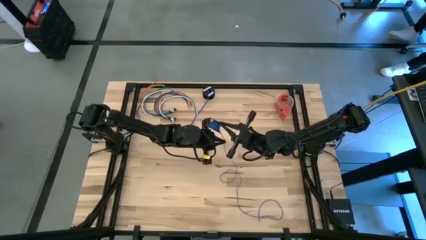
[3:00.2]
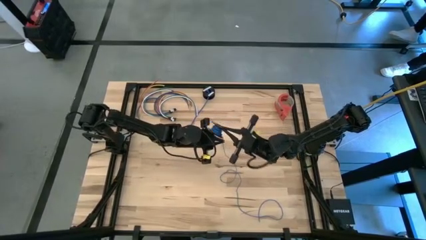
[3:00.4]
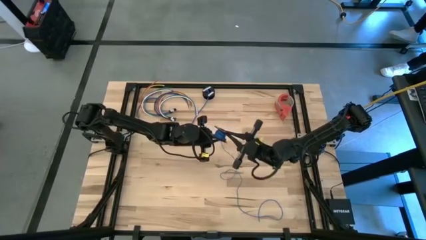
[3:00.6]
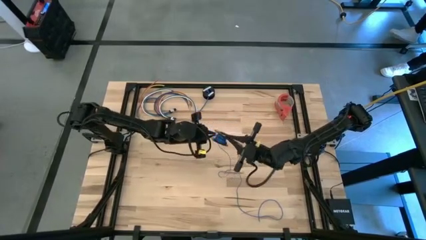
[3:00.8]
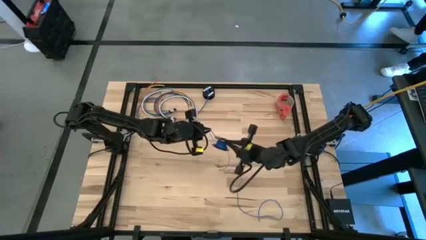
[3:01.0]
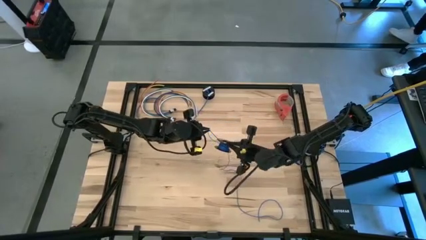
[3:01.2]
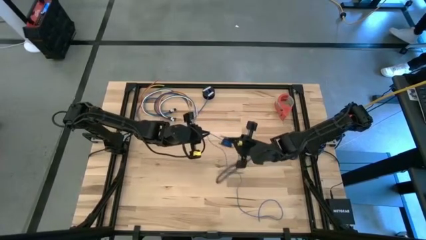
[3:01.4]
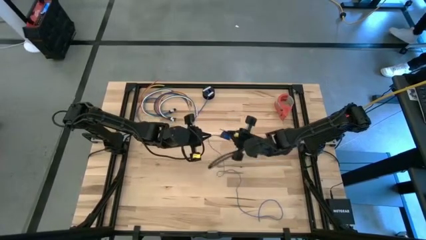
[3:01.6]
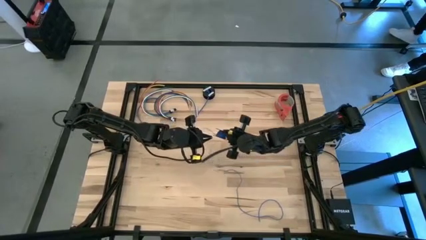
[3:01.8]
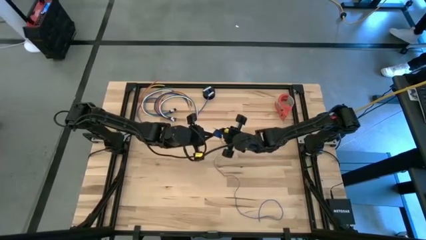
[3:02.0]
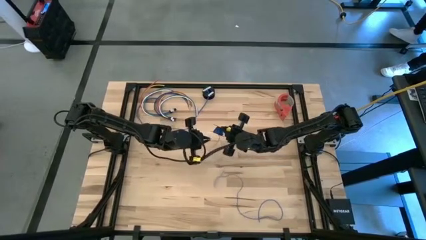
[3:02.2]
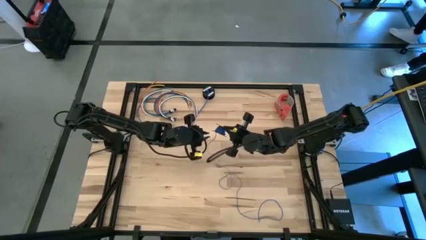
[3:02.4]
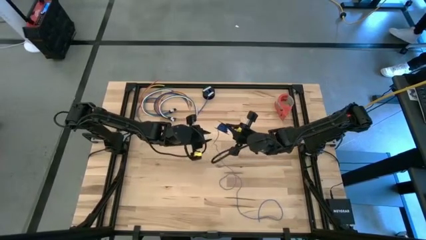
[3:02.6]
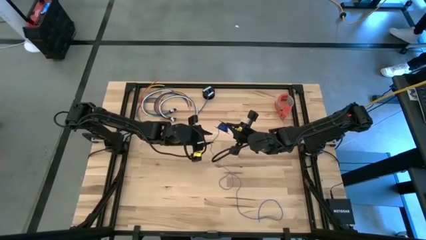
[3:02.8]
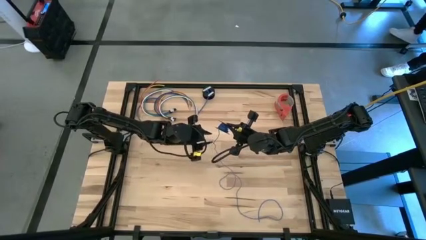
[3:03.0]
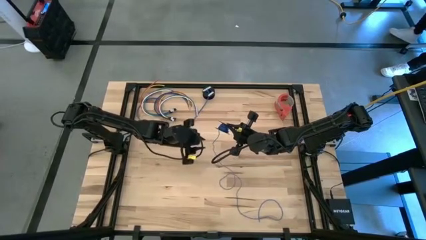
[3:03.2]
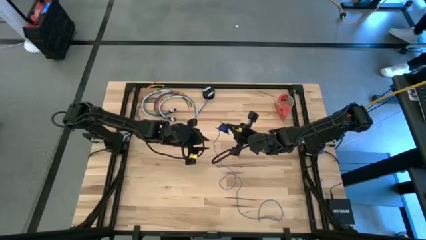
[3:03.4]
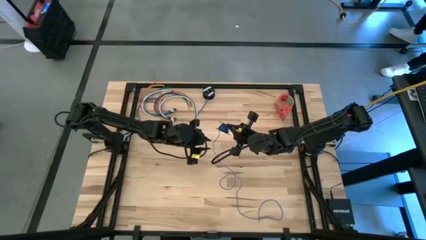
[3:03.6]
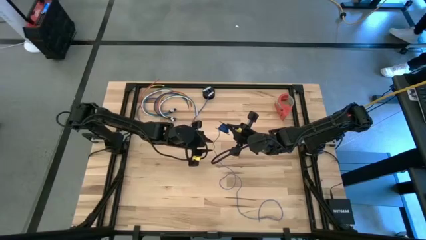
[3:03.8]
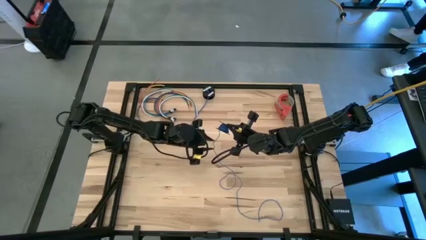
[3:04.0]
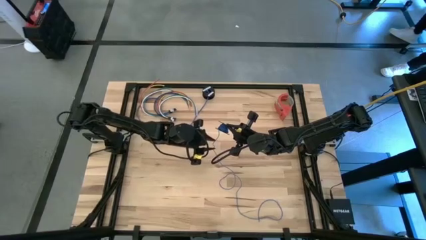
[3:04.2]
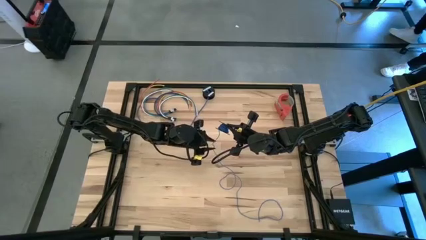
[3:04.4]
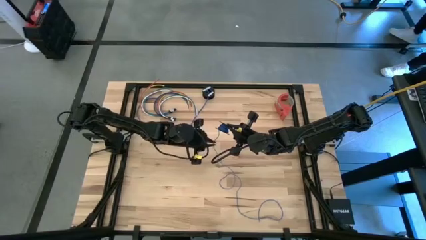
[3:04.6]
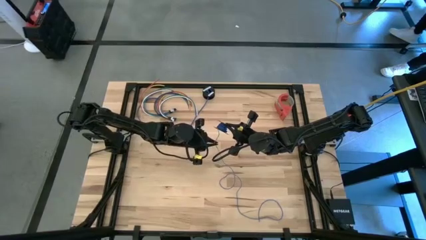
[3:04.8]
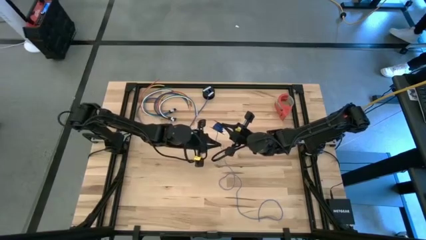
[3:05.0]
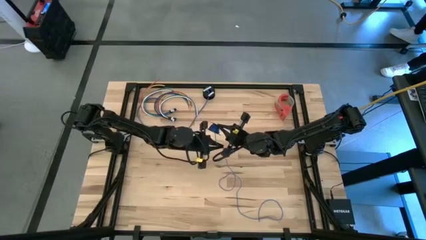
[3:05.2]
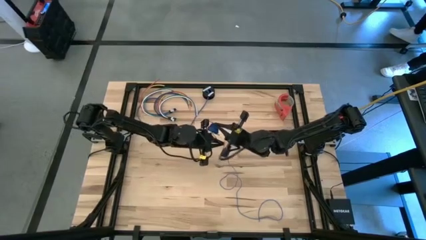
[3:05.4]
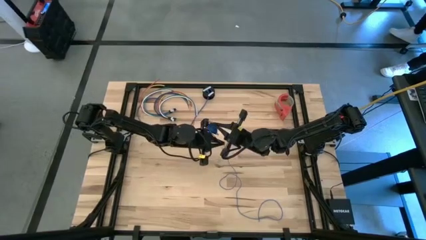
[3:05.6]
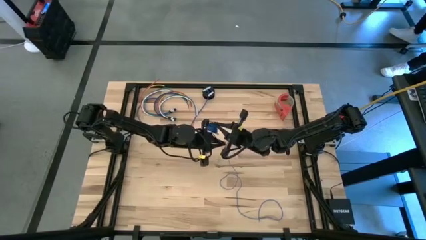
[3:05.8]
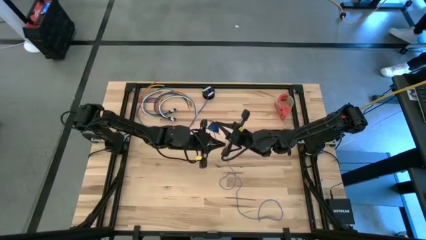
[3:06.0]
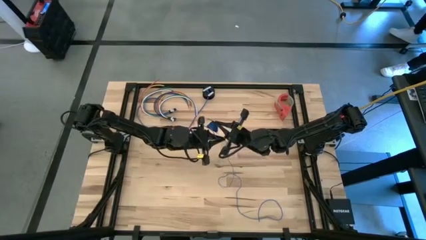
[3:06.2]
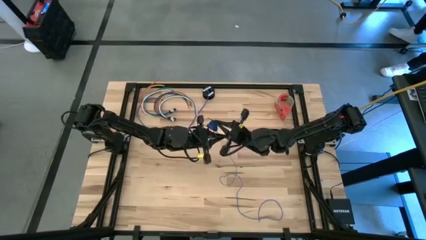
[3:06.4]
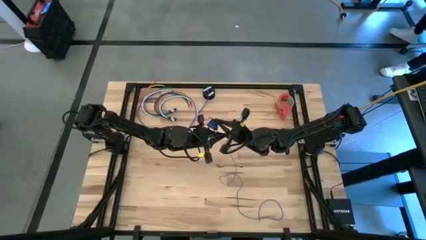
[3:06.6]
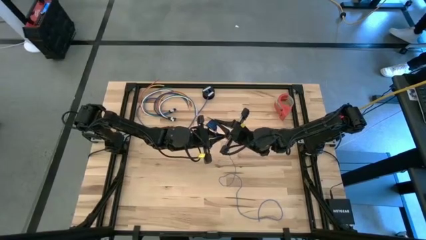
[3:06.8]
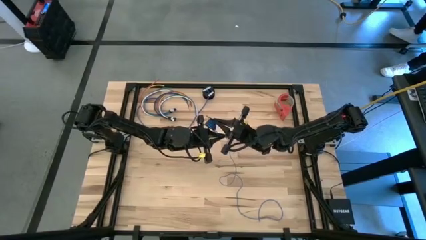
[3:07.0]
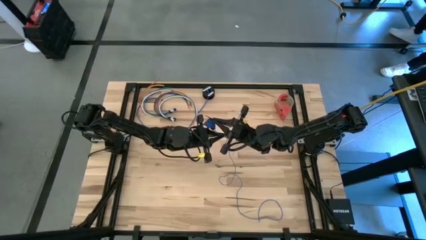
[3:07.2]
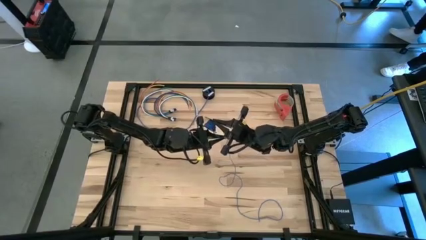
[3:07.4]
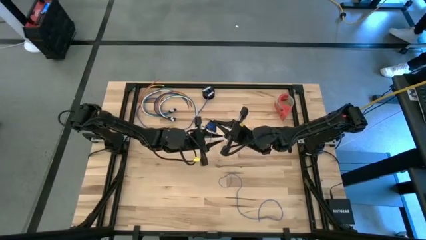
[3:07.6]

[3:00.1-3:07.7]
Task: Coil cords
Coil the blue wire onto the black spool

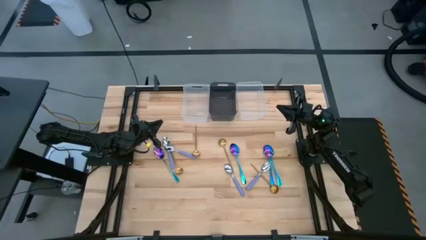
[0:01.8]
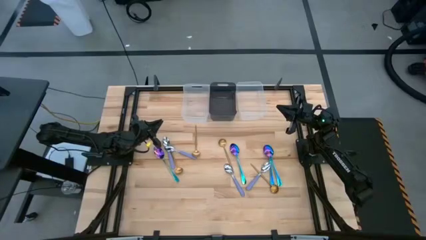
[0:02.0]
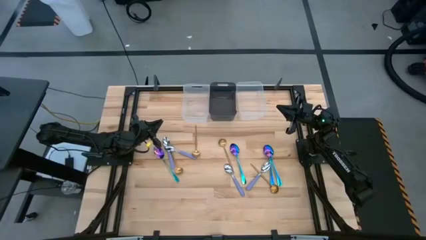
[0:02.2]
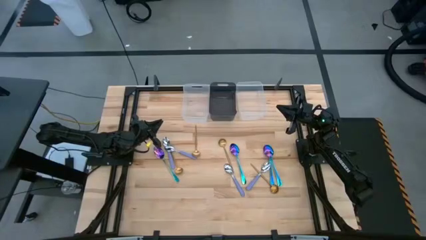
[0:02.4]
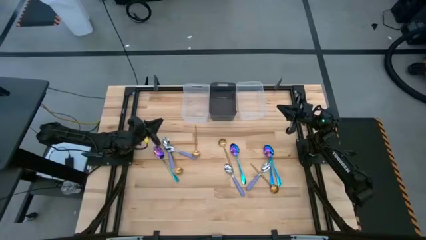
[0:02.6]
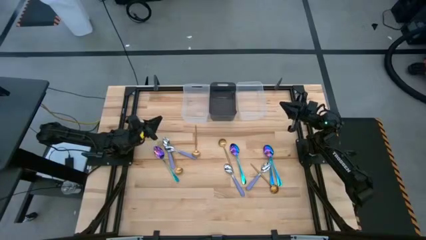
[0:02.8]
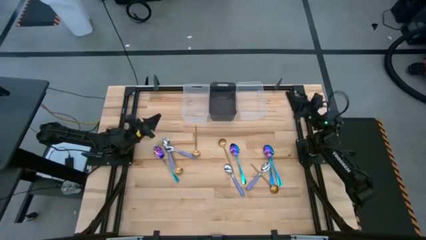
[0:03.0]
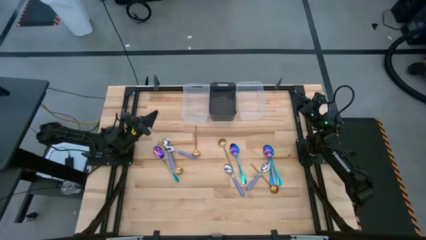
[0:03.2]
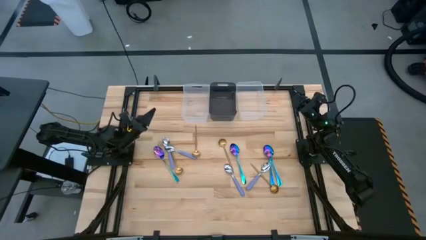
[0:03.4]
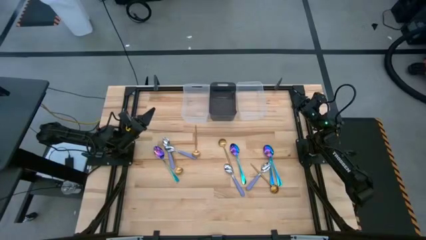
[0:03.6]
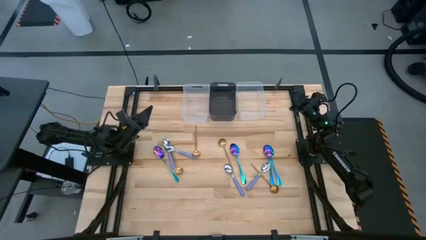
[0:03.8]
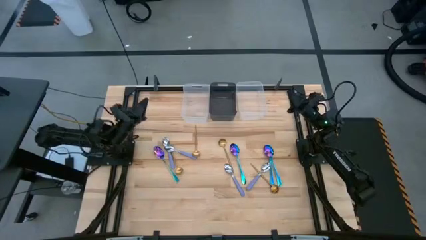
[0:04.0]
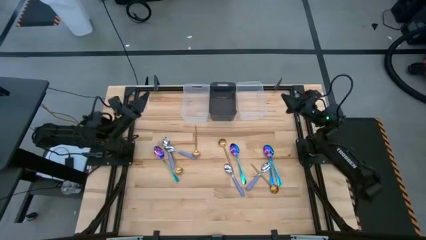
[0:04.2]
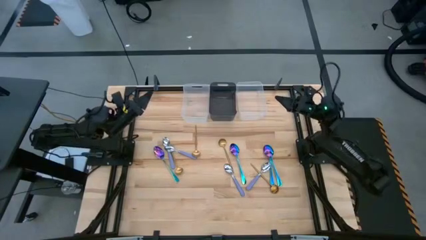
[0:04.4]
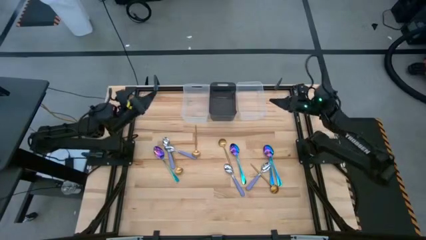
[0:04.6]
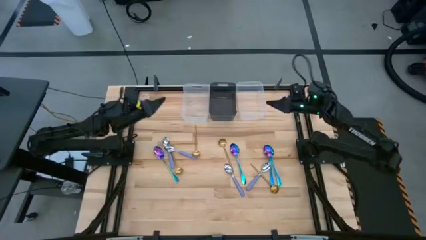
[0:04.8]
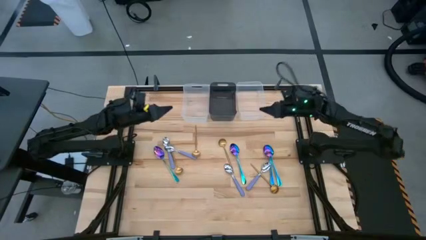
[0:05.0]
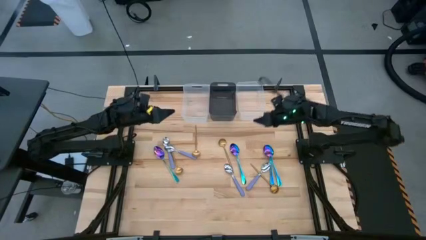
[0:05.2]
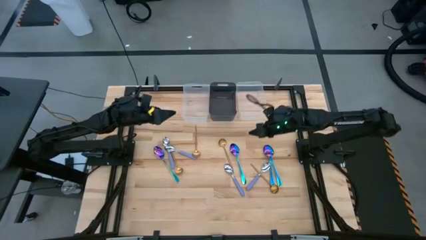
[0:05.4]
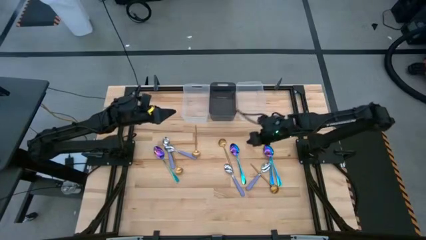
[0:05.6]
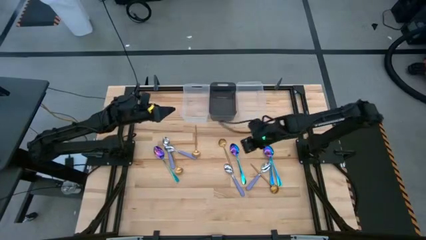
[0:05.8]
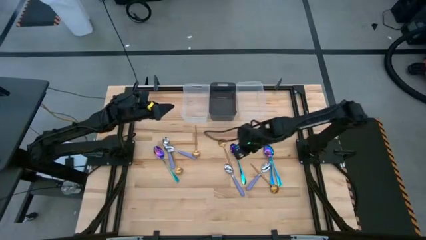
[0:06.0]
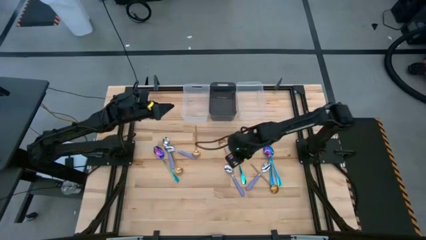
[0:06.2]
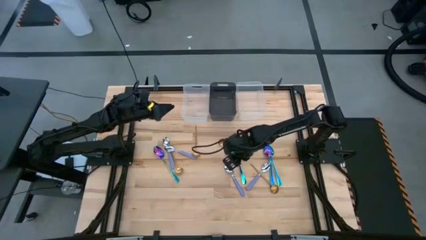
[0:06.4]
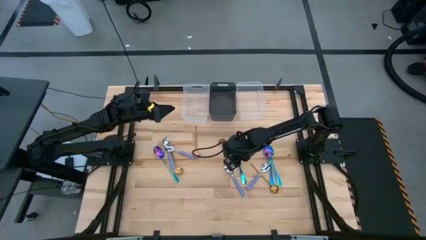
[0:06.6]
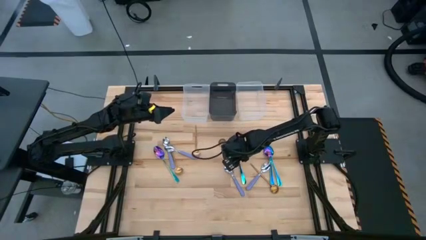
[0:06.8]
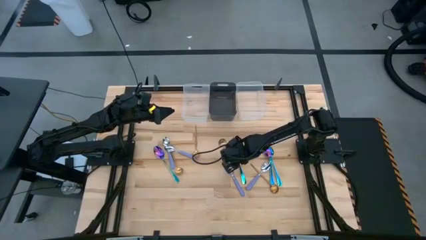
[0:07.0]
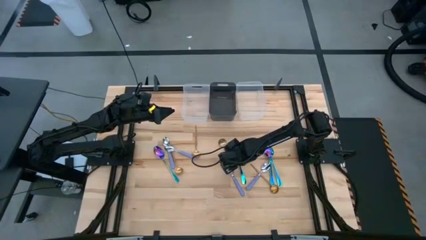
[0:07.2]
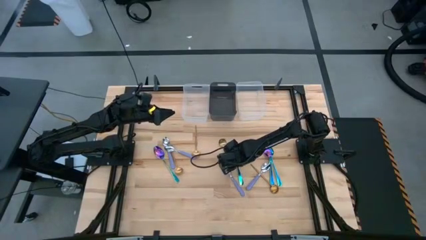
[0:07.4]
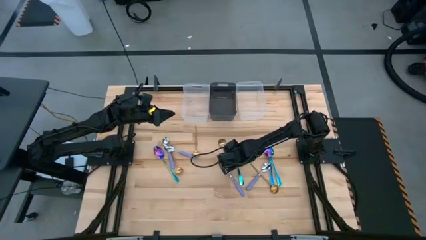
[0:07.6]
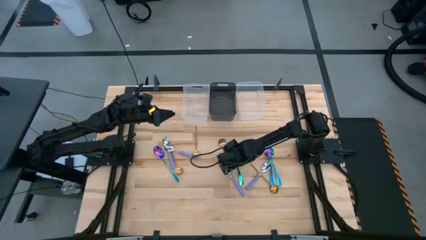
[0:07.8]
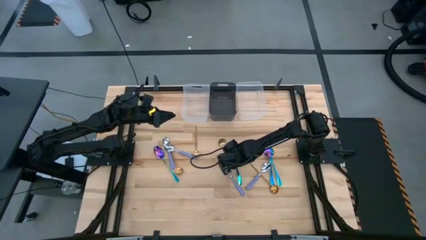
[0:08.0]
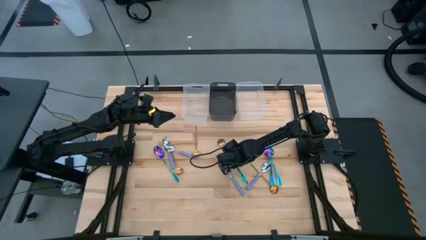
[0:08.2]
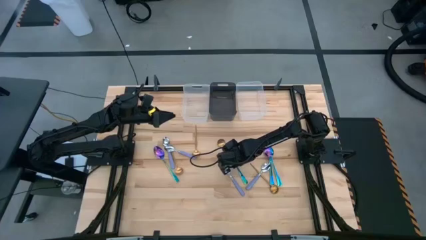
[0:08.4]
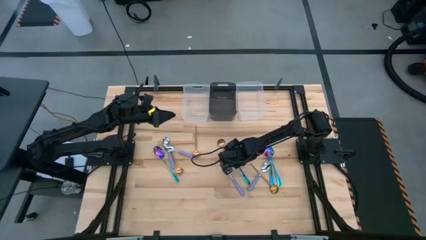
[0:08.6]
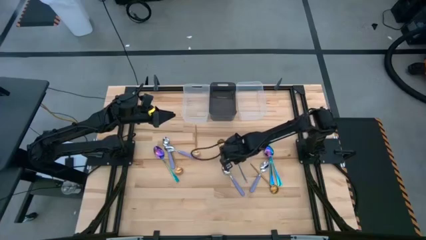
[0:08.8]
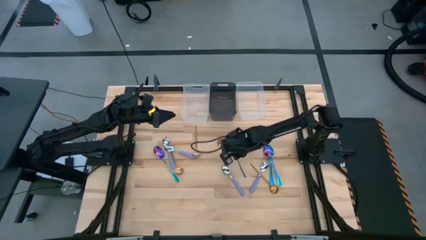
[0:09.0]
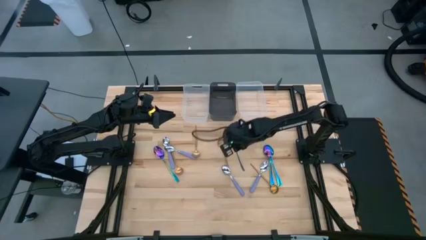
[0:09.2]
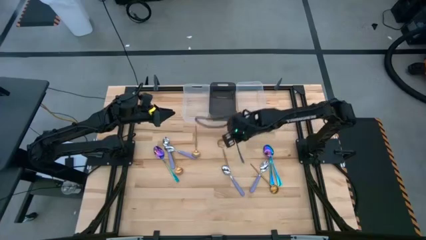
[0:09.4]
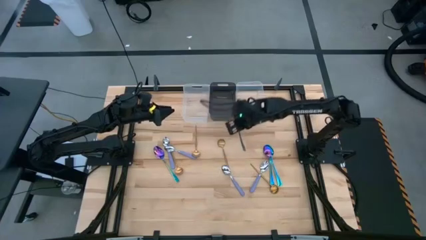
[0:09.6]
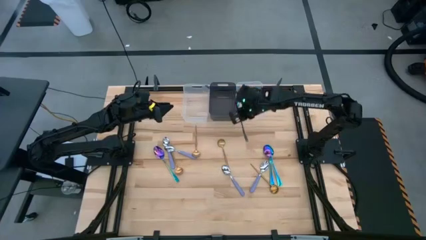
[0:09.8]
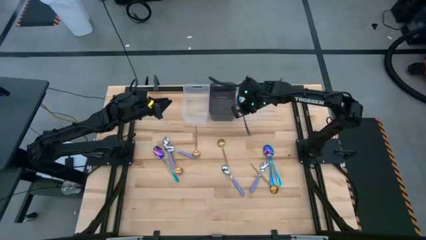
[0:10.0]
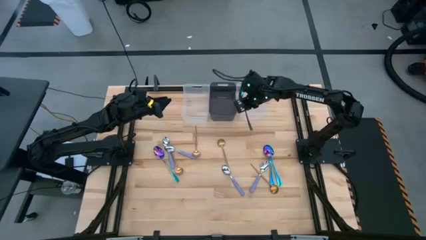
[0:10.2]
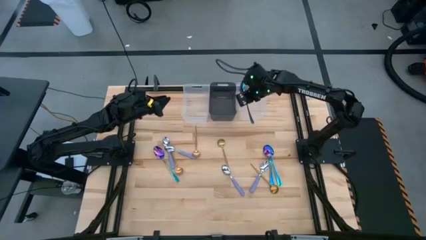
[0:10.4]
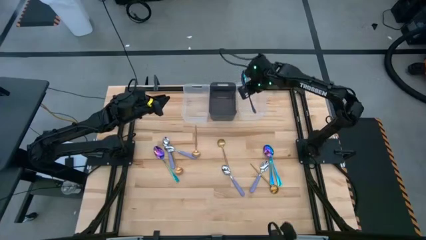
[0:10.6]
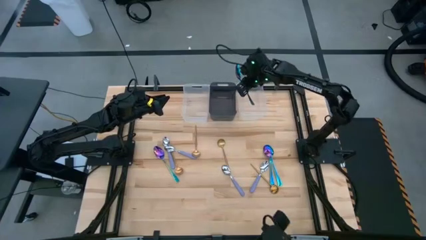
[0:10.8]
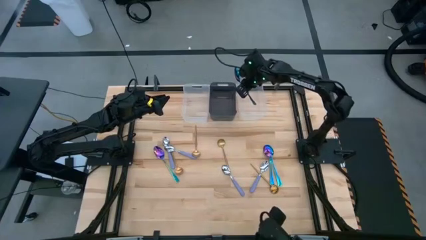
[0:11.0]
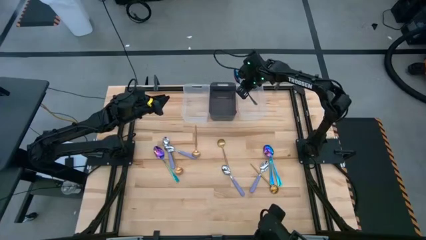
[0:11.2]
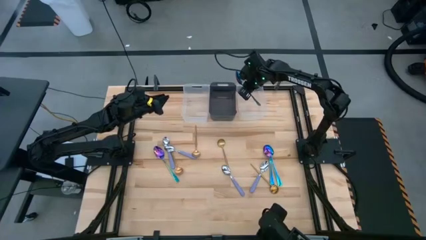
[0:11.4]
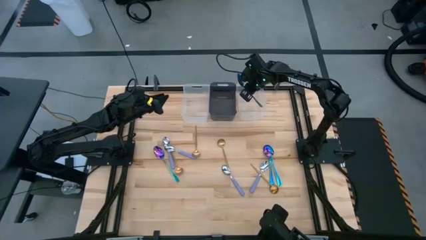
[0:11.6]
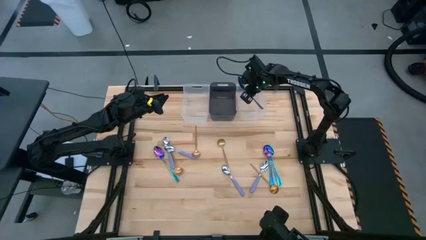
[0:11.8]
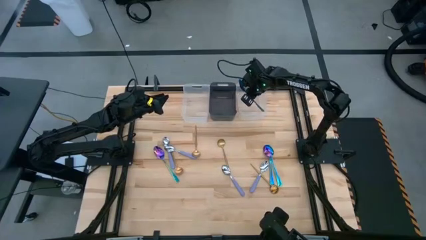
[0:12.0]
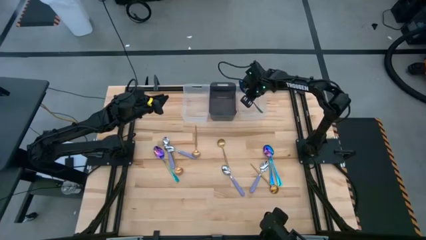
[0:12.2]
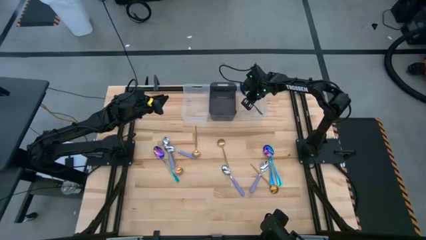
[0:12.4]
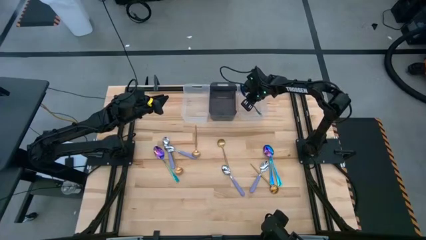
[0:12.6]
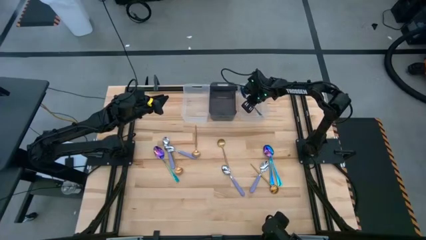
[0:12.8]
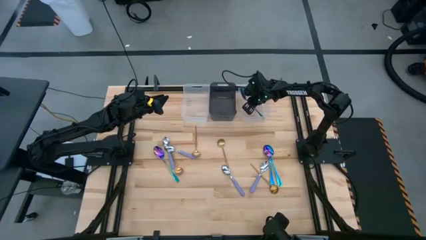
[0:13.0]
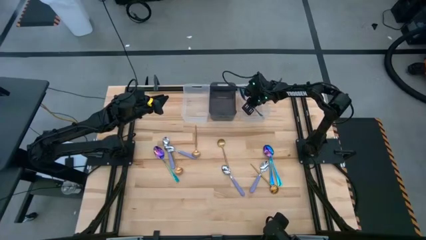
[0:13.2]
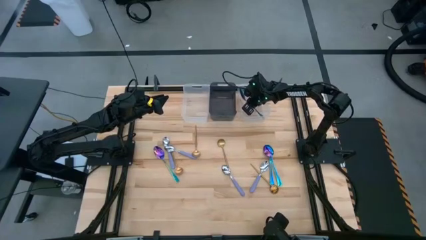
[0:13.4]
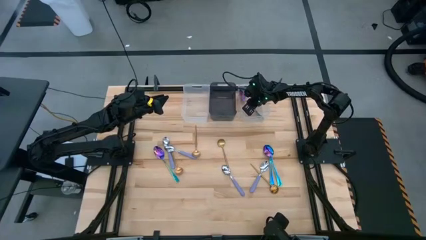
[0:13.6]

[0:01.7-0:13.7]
Task: Sort silverware by color (type)
Put the blue spoon into the right transparent bin
